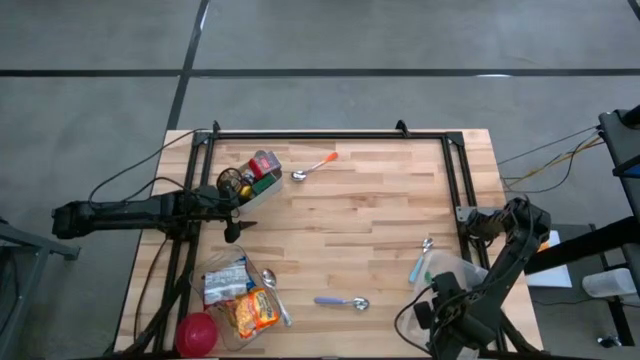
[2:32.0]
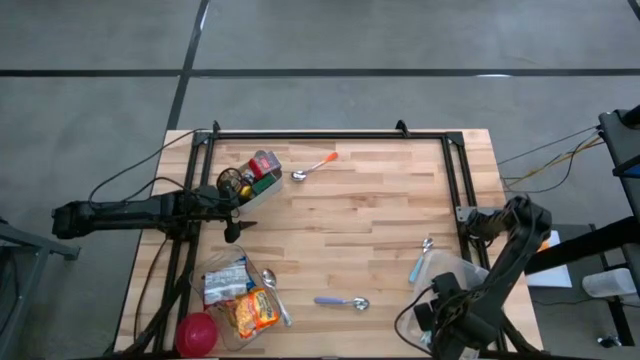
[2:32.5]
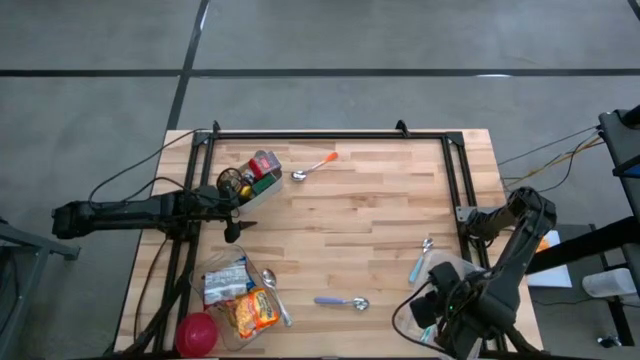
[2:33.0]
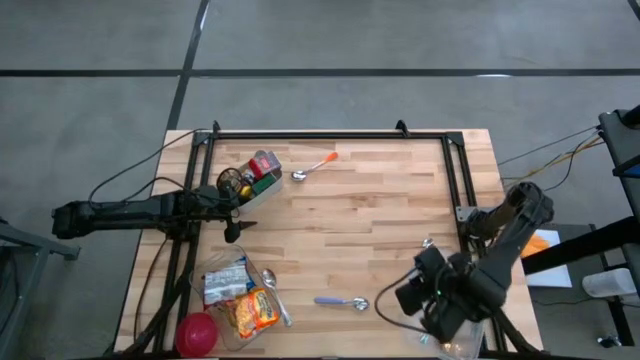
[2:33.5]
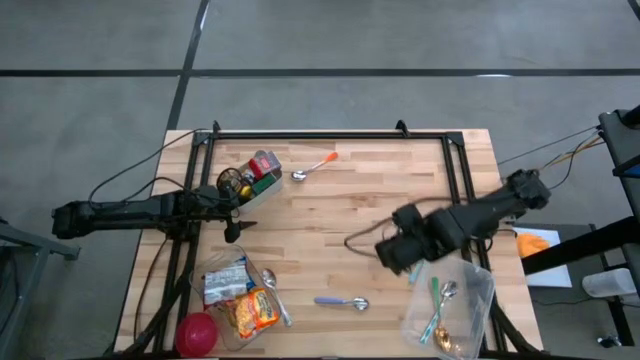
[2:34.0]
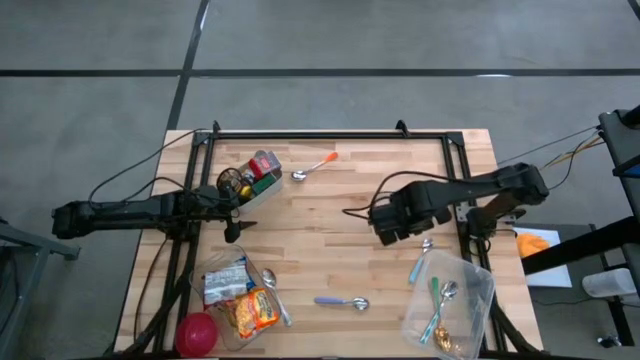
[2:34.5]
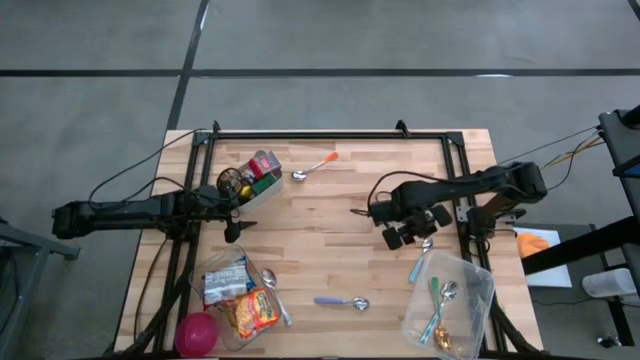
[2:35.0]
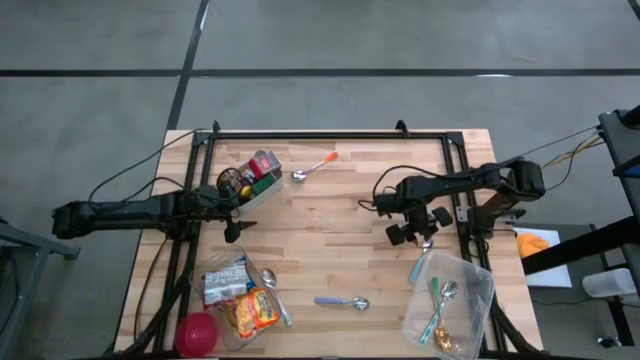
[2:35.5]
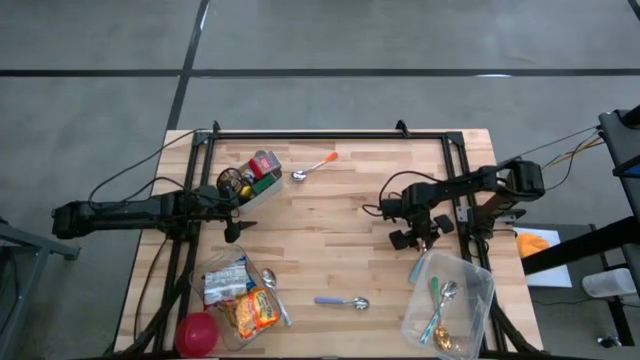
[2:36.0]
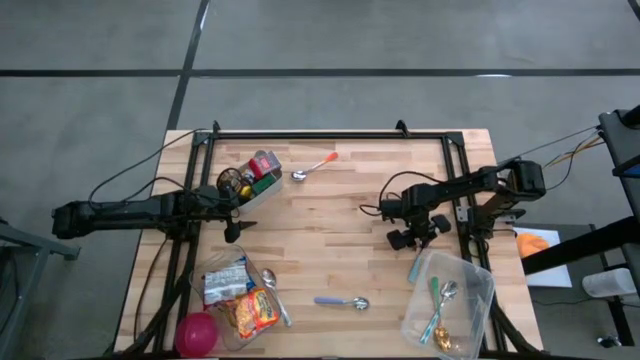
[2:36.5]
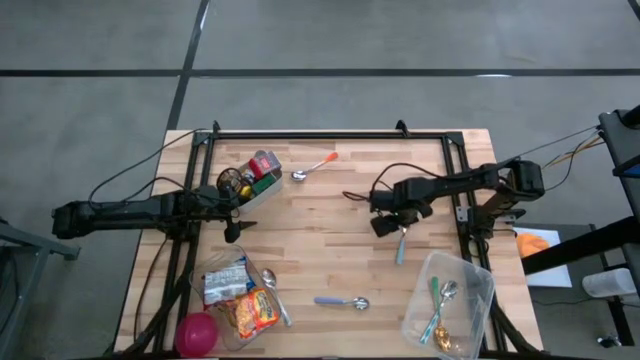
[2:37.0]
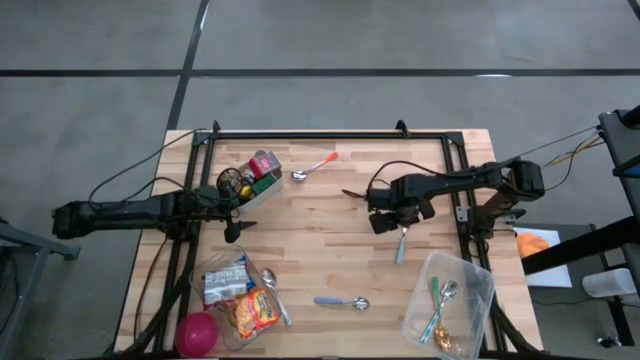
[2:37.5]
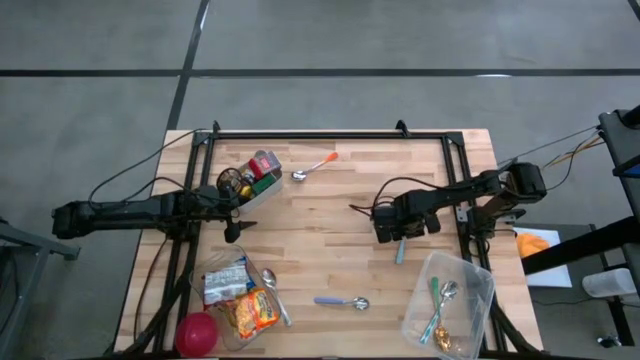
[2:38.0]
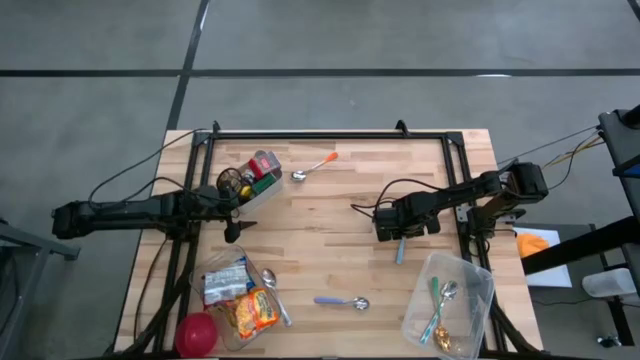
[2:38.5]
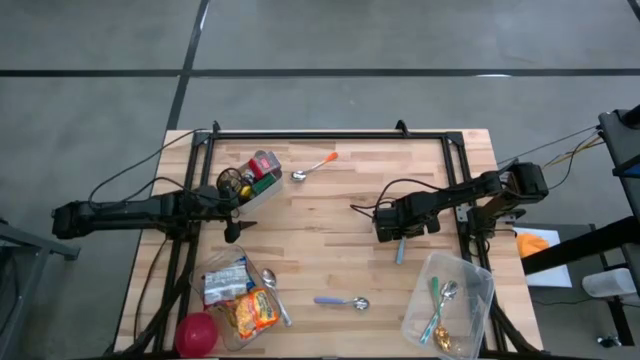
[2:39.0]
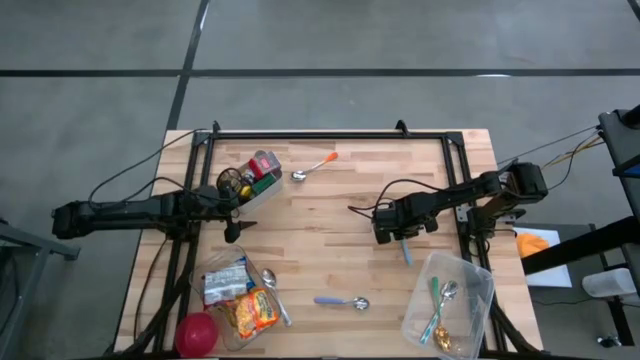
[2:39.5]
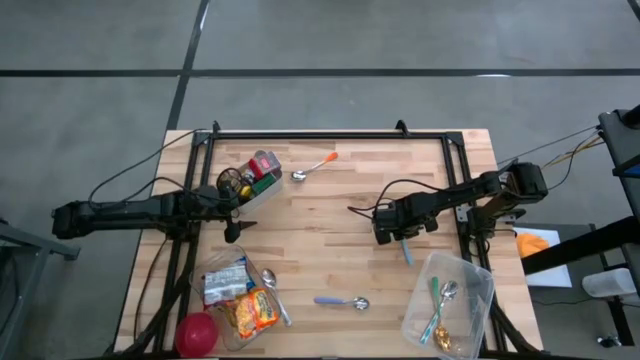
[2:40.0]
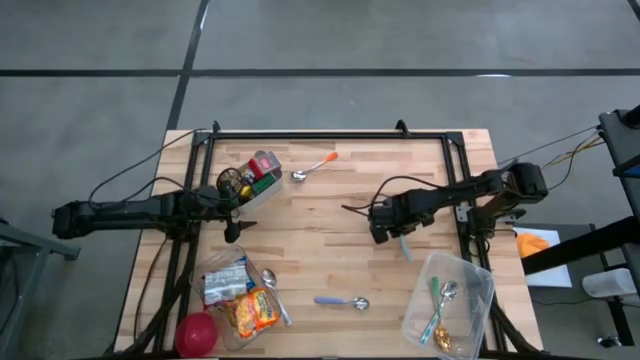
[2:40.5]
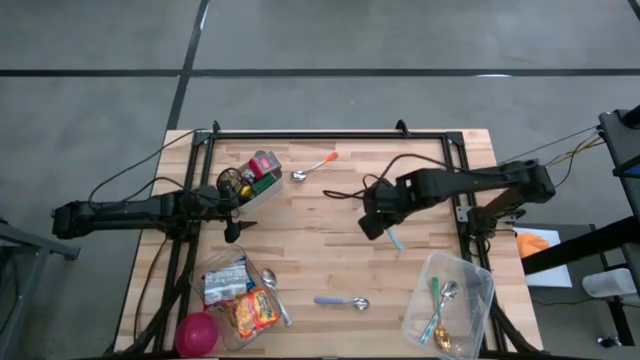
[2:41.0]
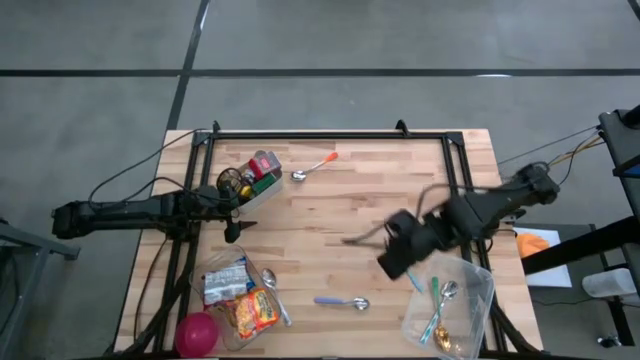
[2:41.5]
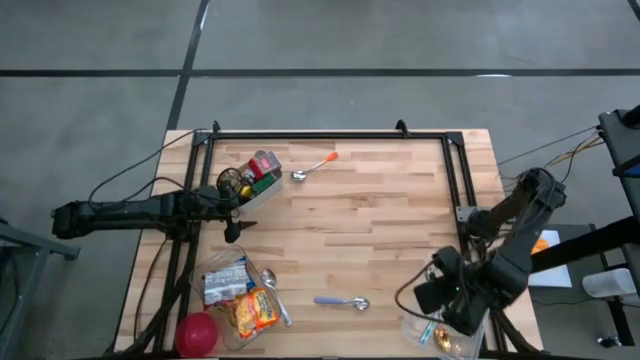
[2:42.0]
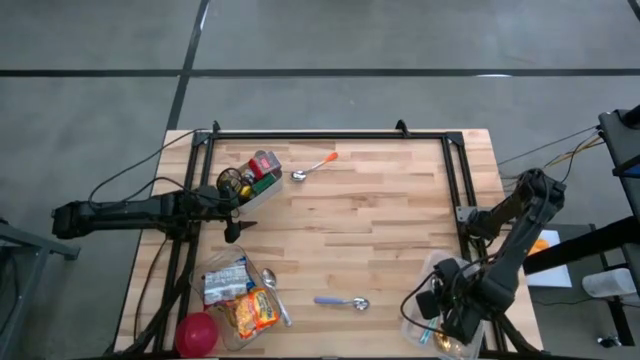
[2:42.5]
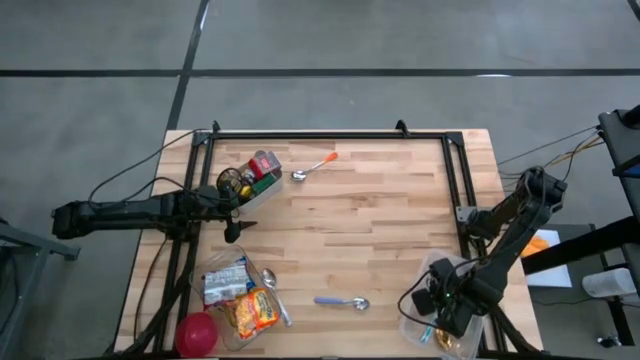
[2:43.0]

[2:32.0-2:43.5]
Put the blue spoon into the white bin

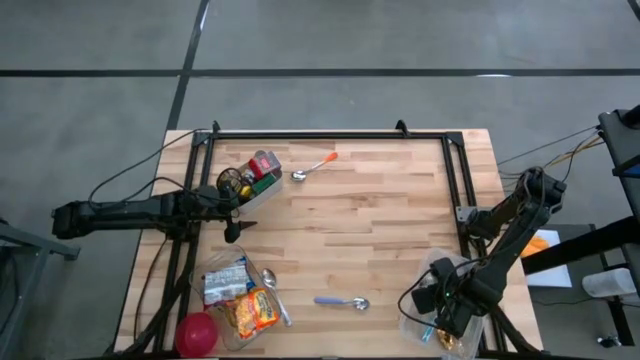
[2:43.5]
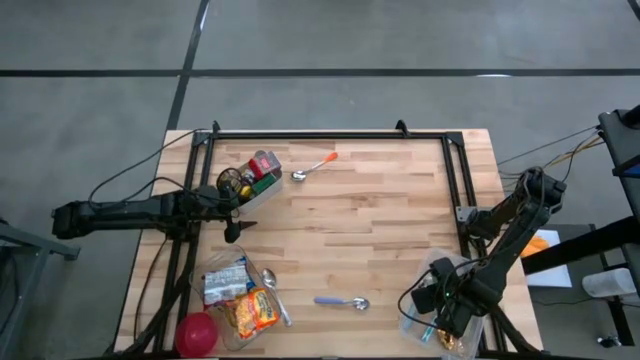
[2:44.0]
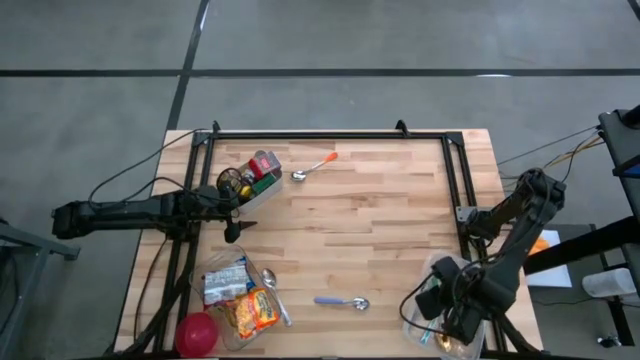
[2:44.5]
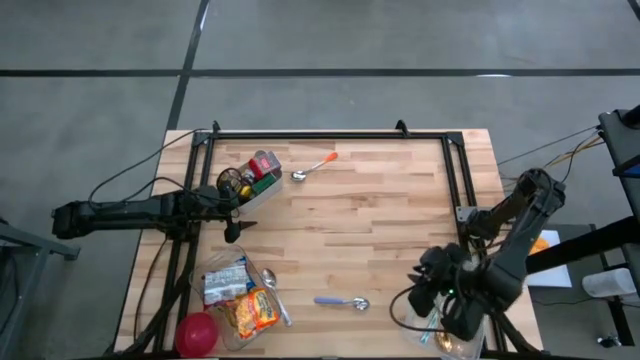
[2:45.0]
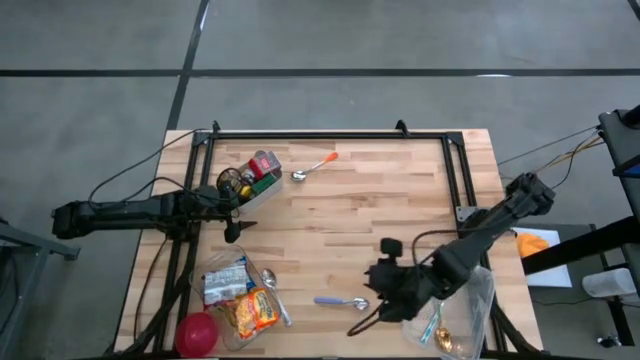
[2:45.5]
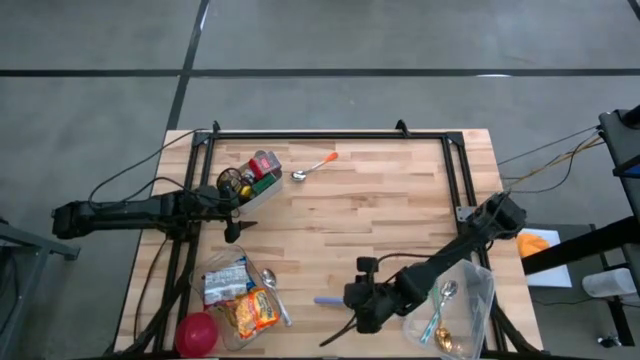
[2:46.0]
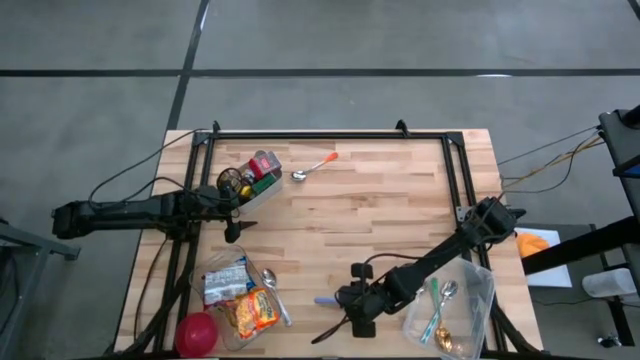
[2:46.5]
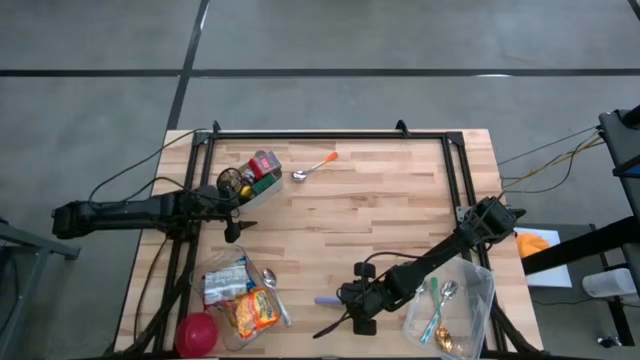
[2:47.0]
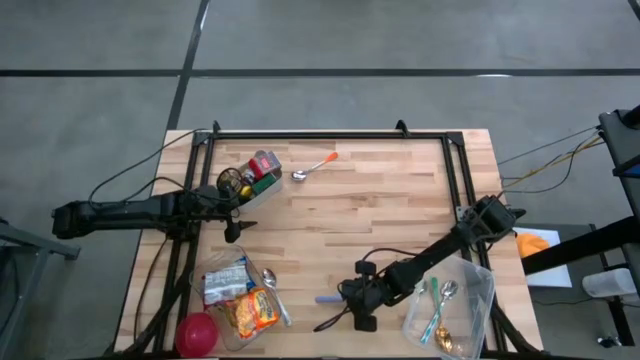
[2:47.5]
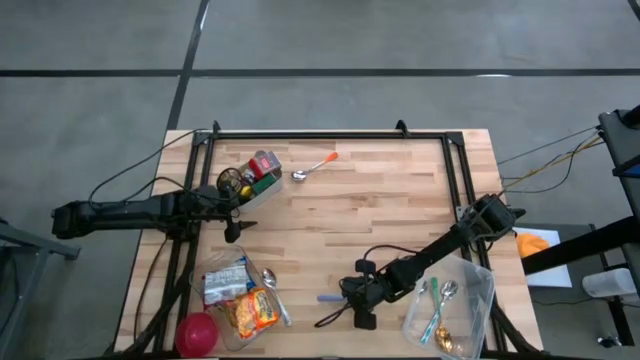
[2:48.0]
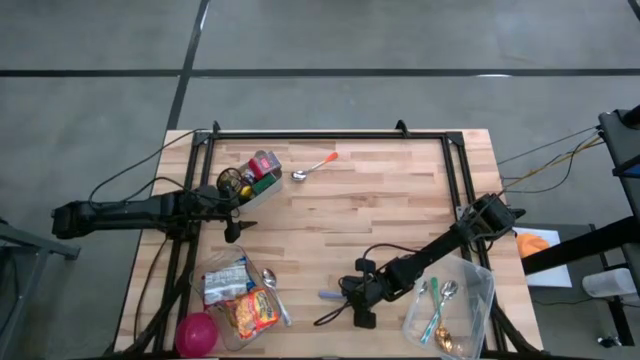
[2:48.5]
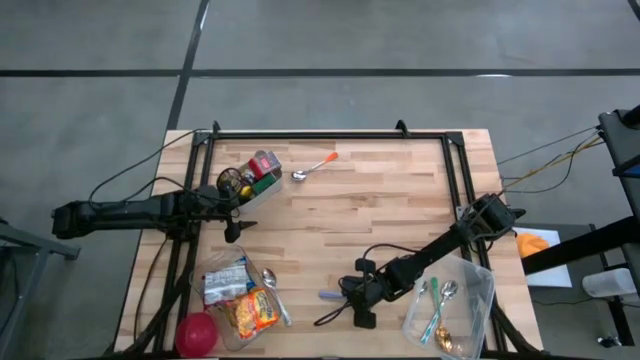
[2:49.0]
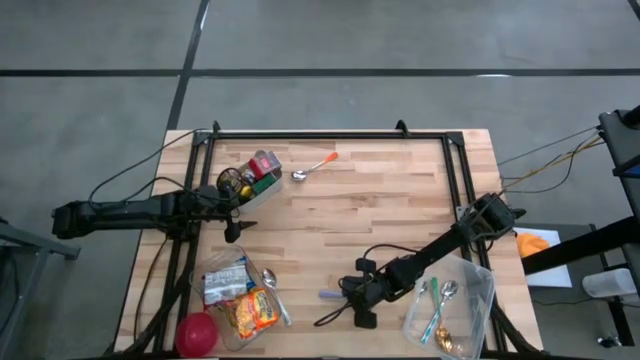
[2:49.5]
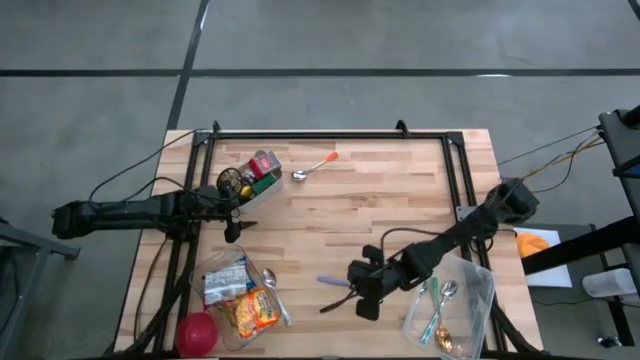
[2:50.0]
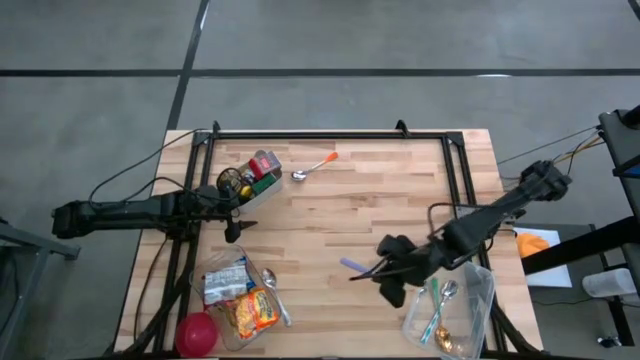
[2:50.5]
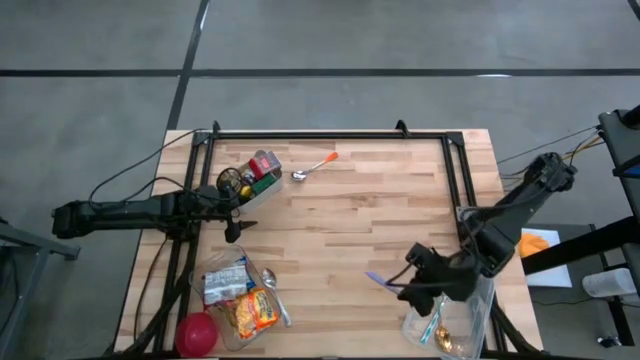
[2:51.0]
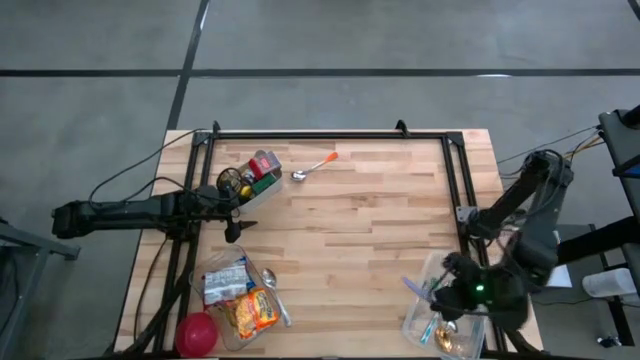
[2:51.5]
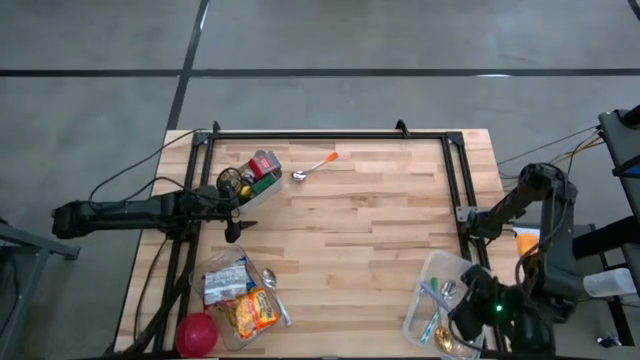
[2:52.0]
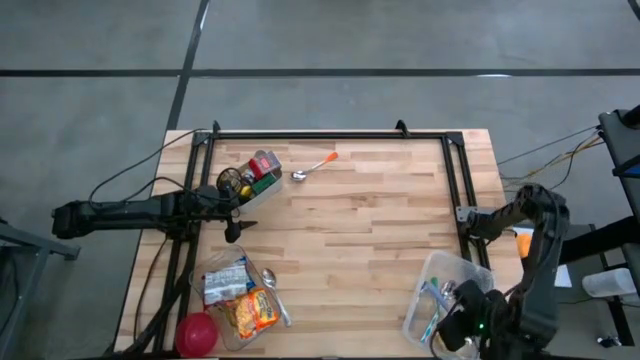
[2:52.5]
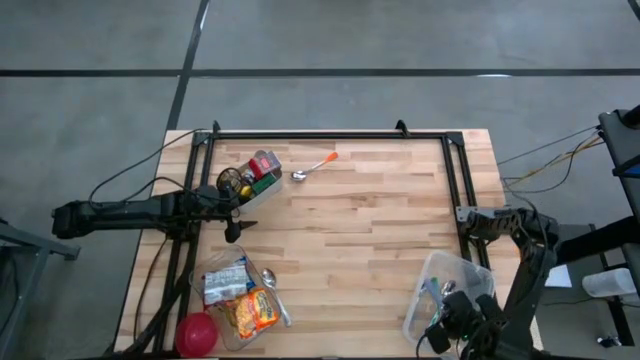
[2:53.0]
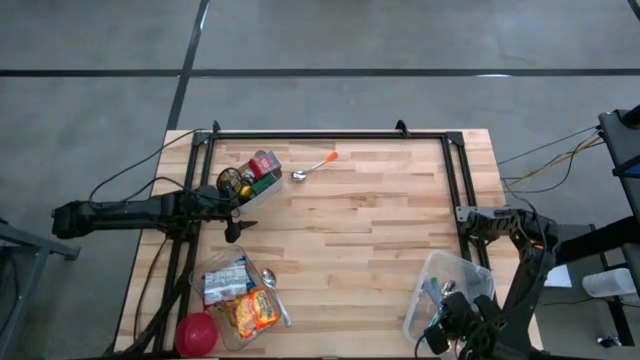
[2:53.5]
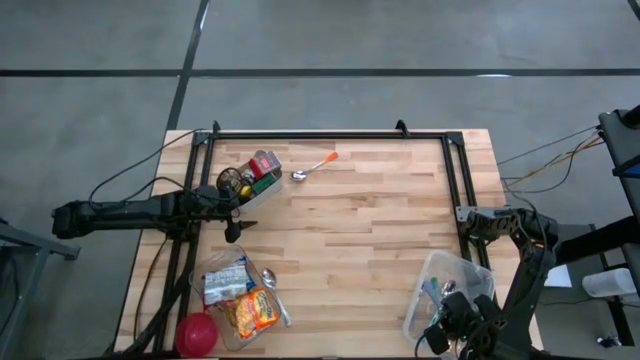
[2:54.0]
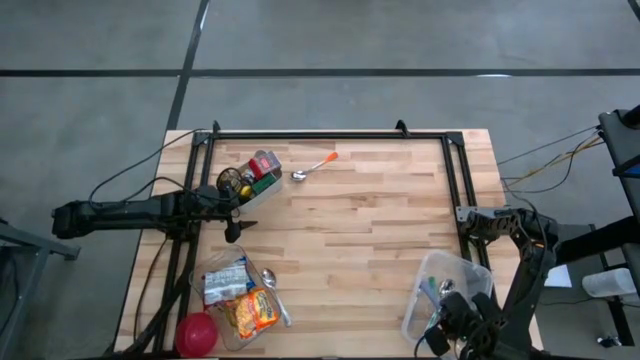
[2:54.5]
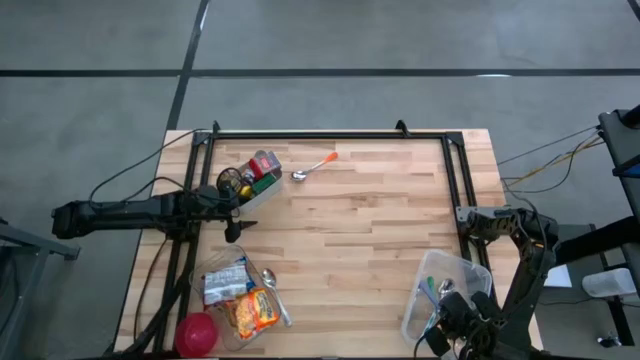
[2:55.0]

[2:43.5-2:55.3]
Put the purple spoon into the white bin
